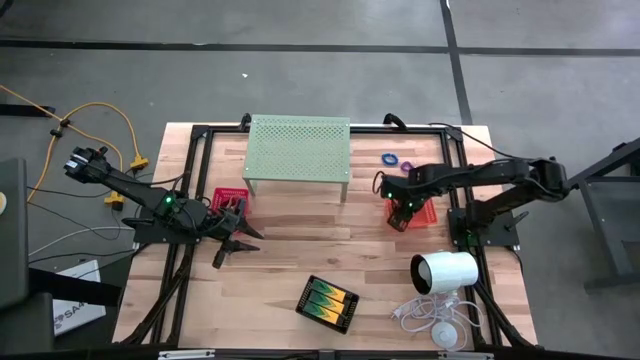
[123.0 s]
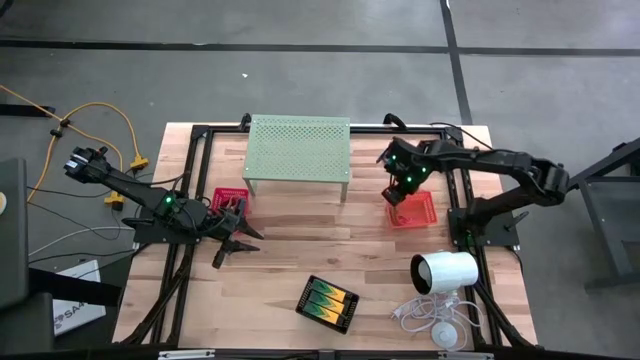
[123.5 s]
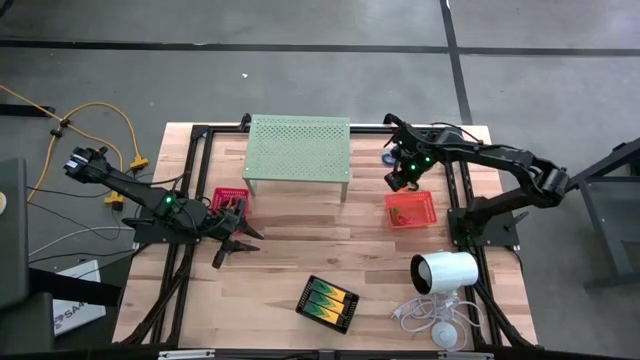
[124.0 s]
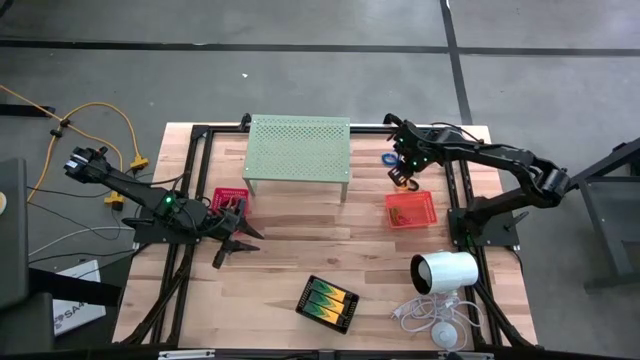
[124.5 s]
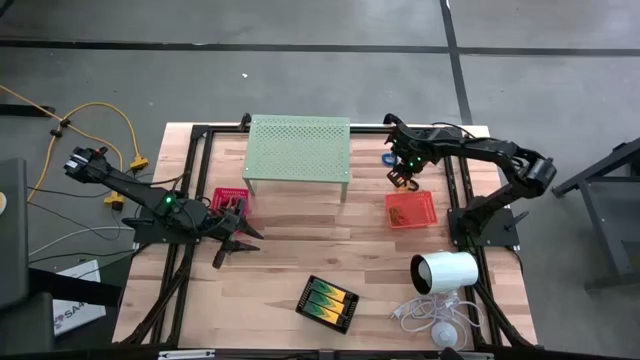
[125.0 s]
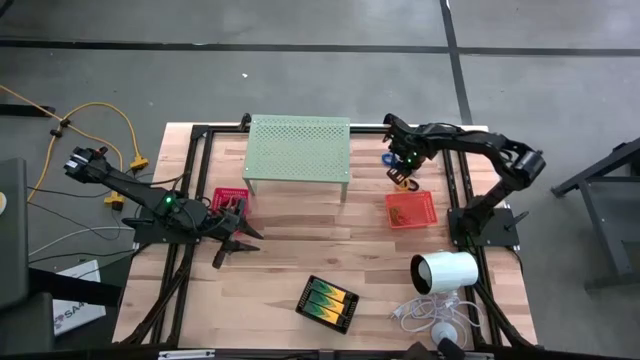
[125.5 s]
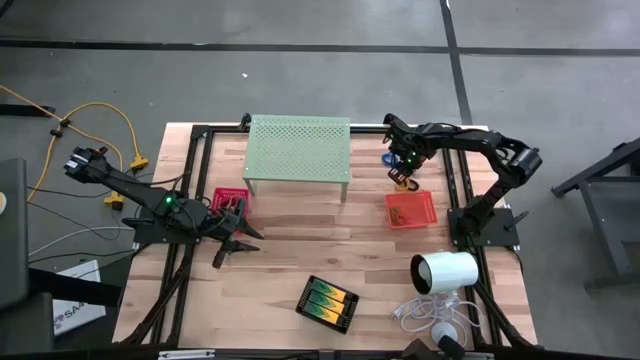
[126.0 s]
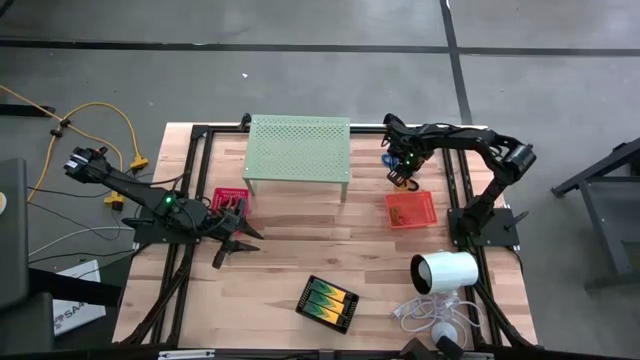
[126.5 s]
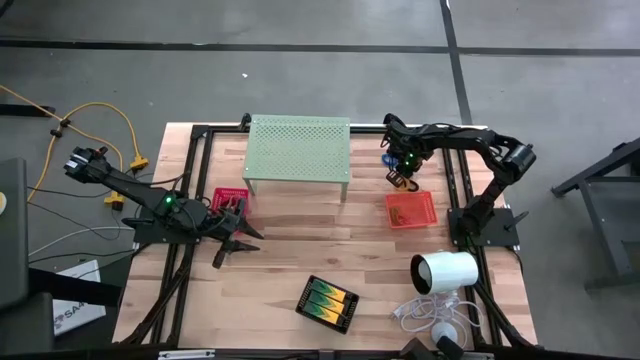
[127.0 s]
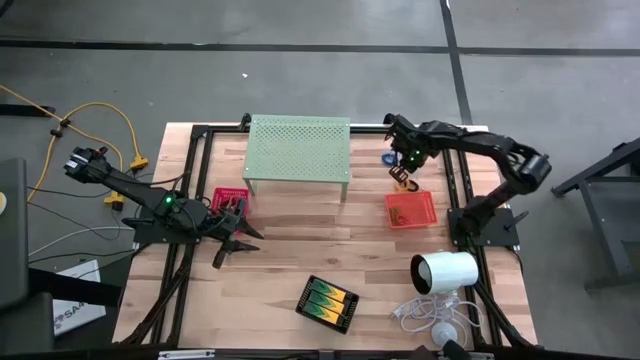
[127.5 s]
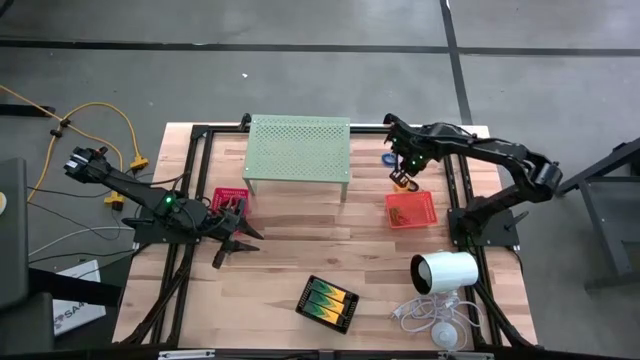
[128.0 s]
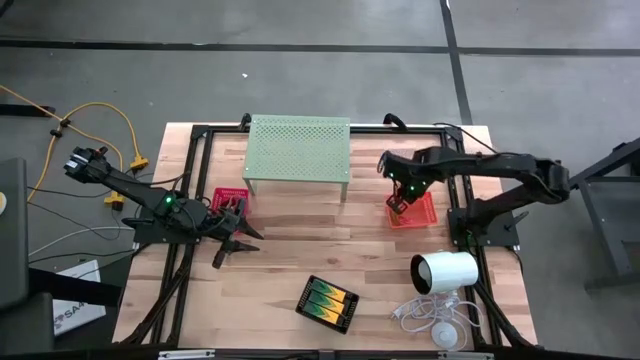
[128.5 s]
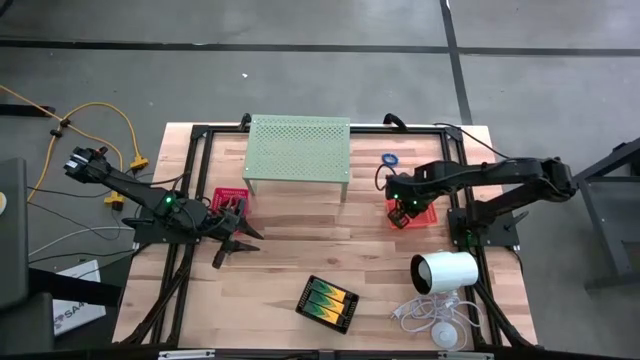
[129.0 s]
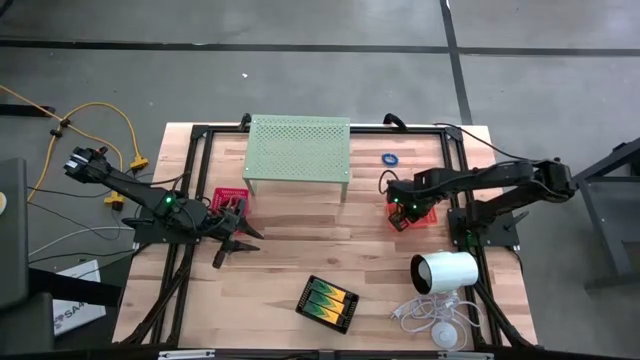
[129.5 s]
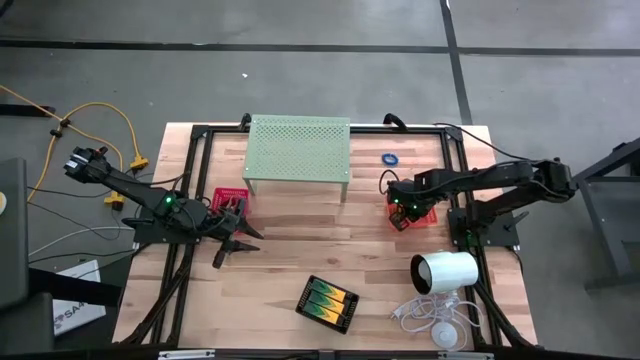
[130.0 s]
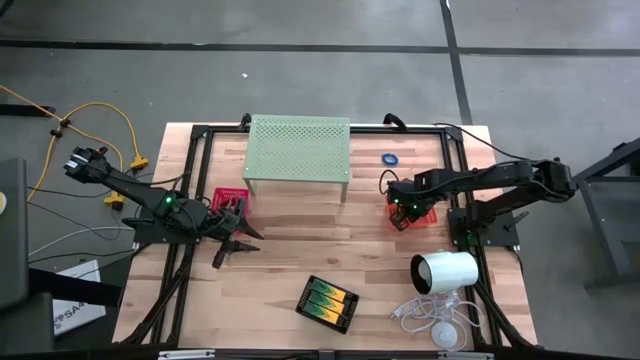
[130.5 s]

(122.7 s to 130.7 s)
Task: Pick & Place Office Desk Supplies
Put the violet spring keychain into the orange bin

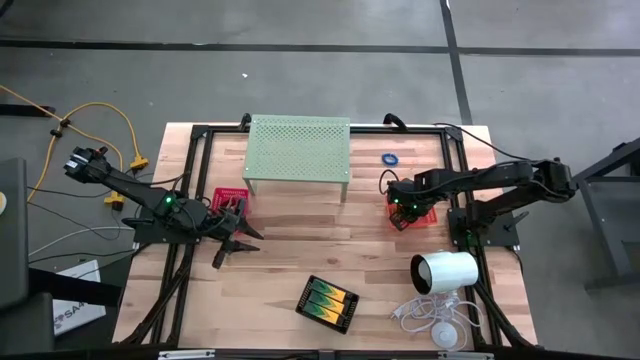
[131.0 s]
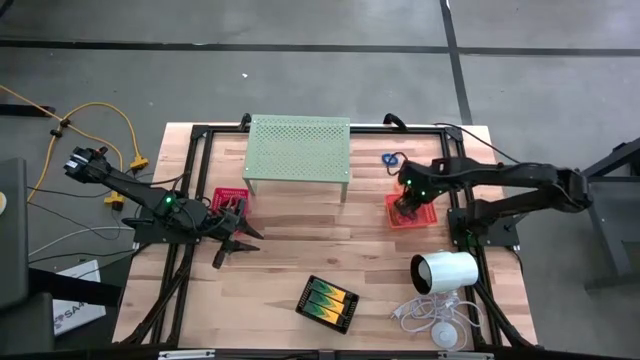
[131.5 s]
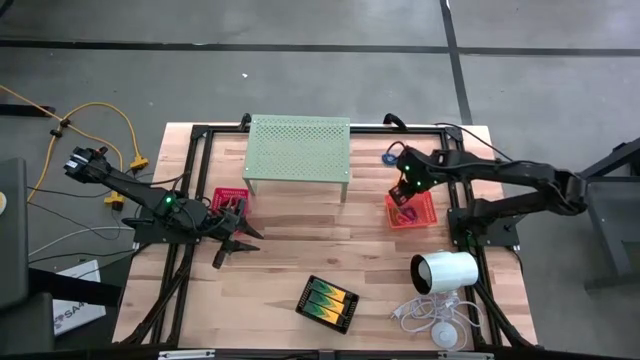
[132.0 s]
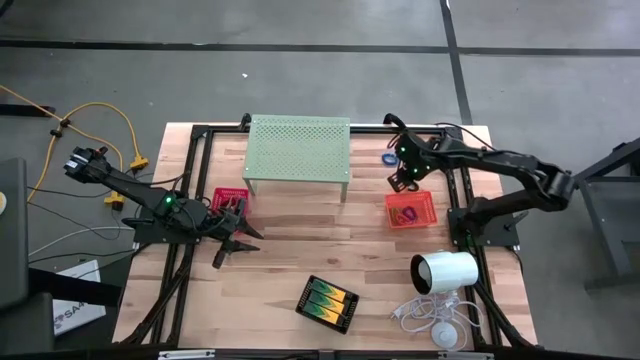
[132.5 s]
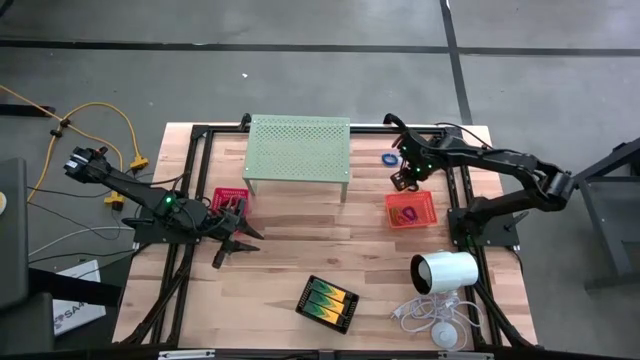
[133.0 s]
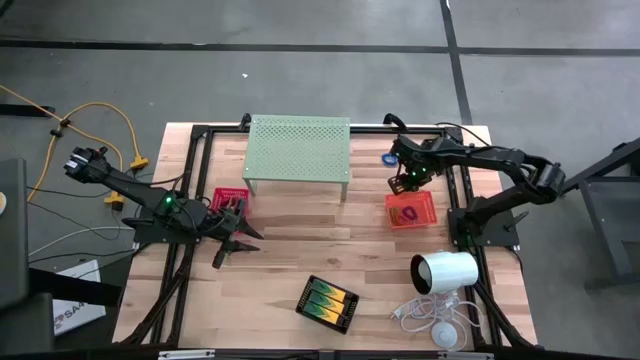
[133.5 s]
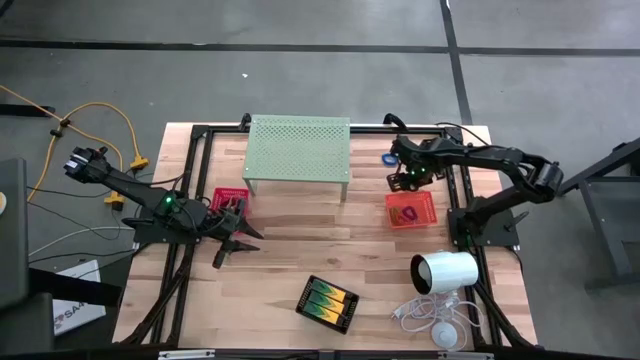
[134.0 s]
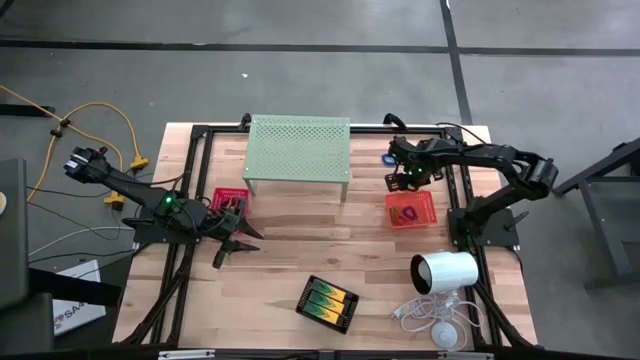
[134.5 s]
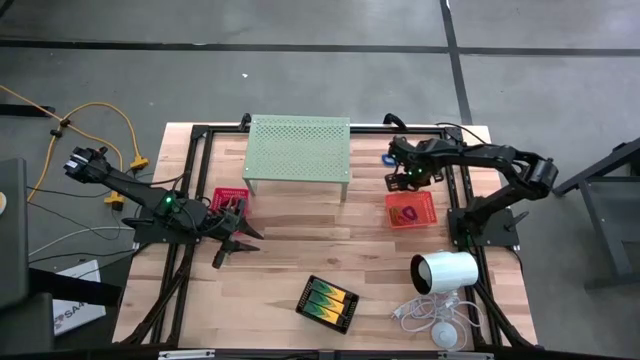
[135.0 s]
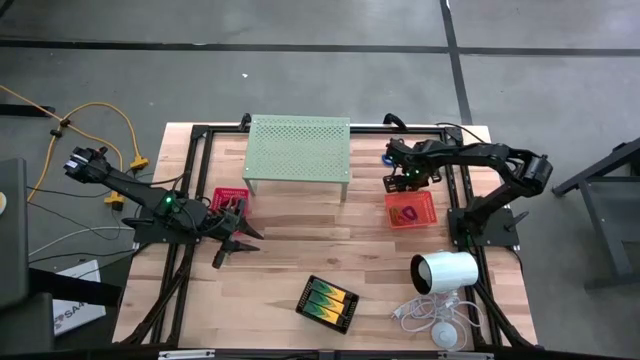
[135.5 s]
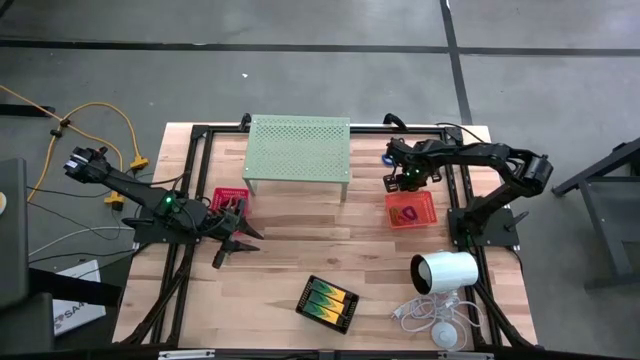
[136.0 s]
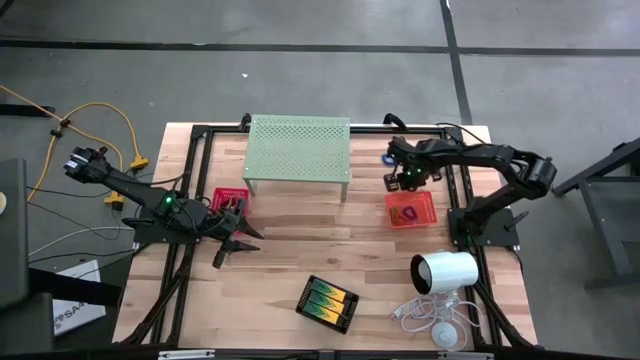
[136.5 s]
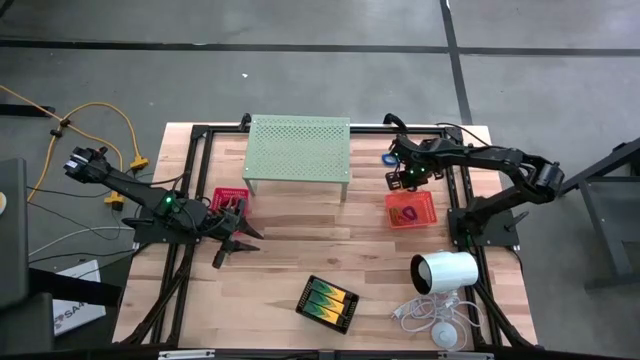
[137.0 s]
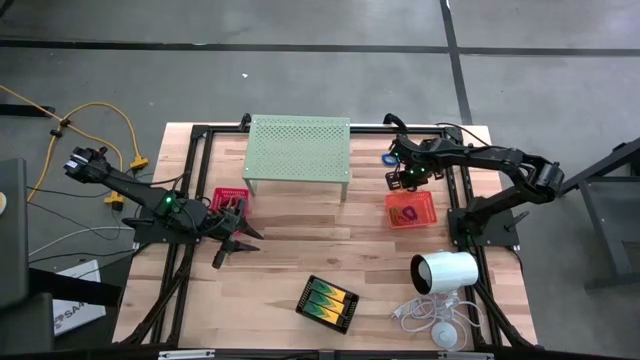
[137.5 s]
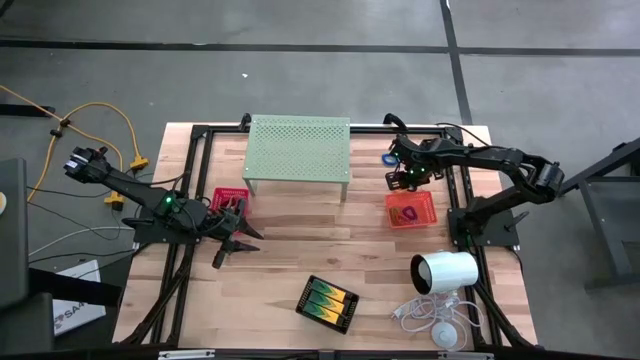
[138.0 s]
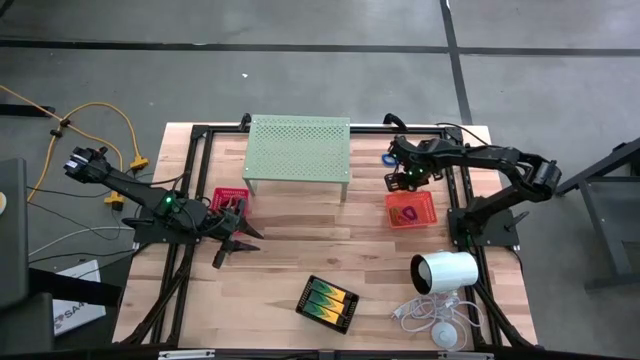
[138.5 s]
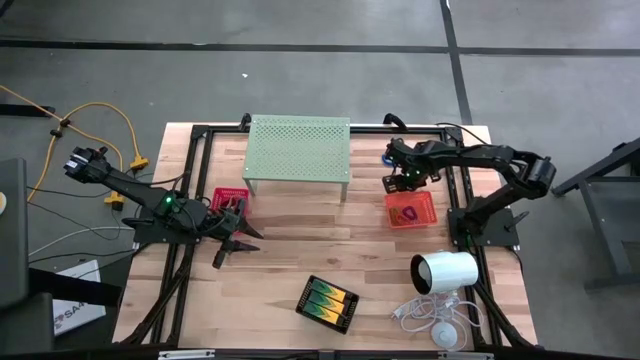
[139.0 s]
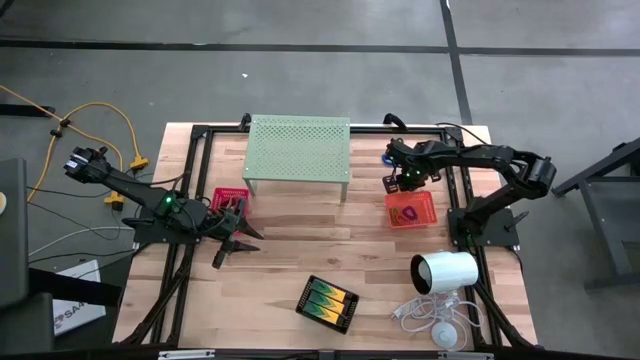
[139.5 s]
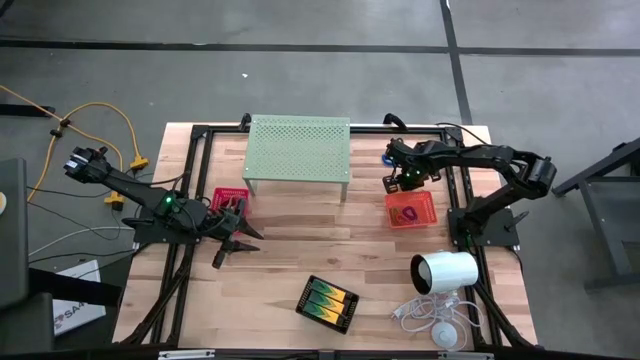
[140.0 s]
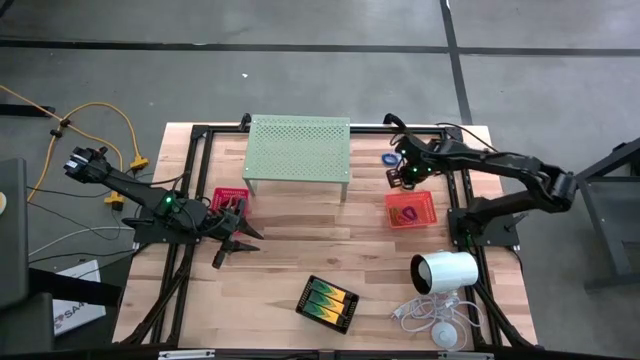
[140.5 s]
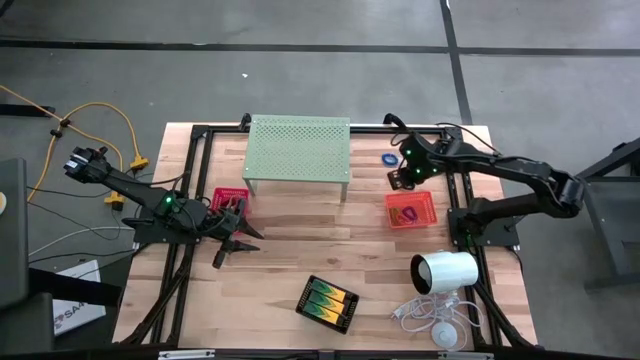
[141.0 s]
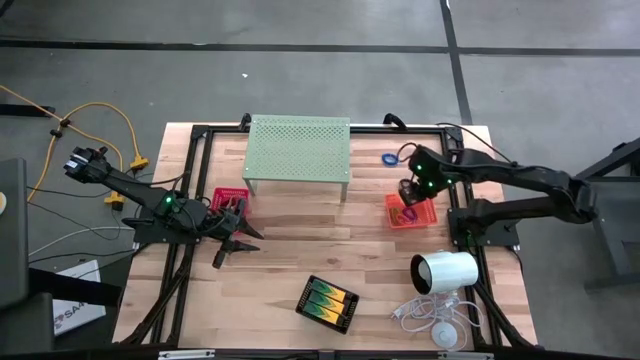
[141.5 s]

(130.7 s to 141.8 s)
Put the yellow spring keychain into the orange bin

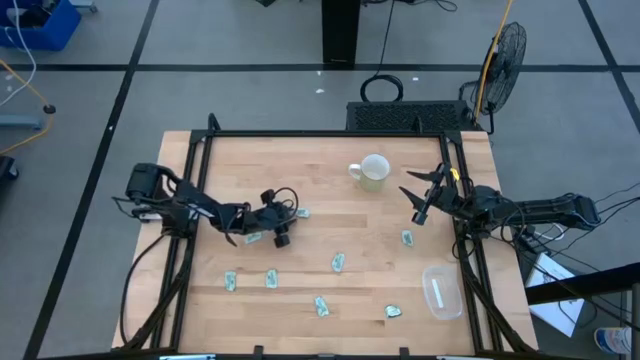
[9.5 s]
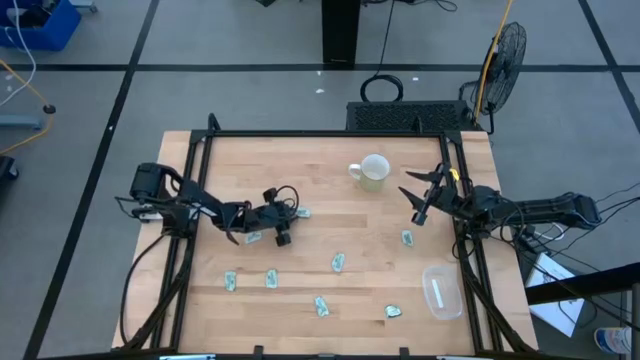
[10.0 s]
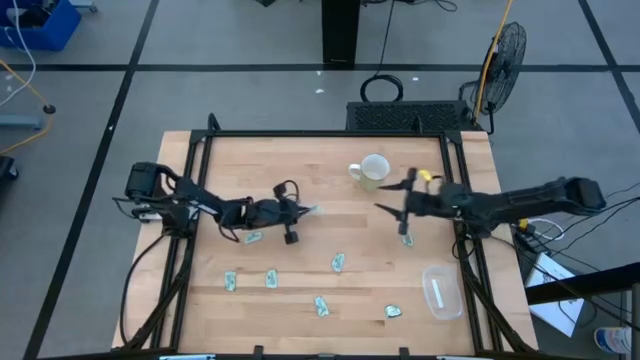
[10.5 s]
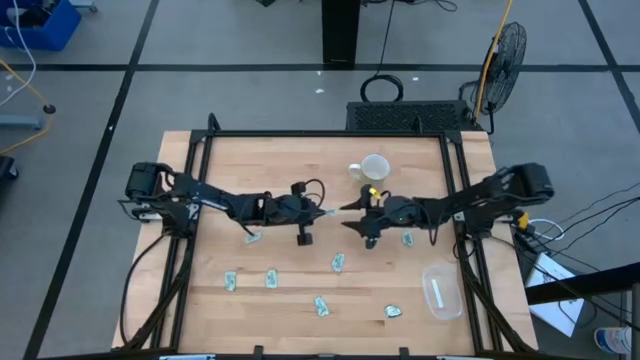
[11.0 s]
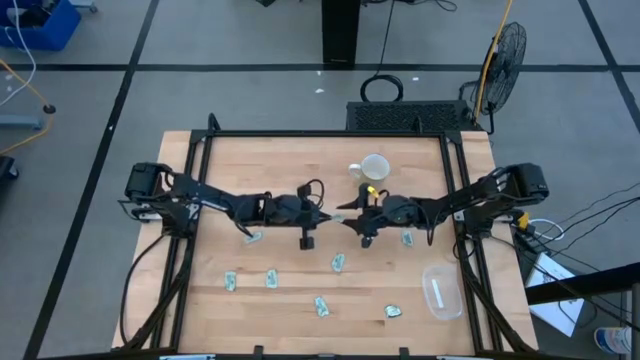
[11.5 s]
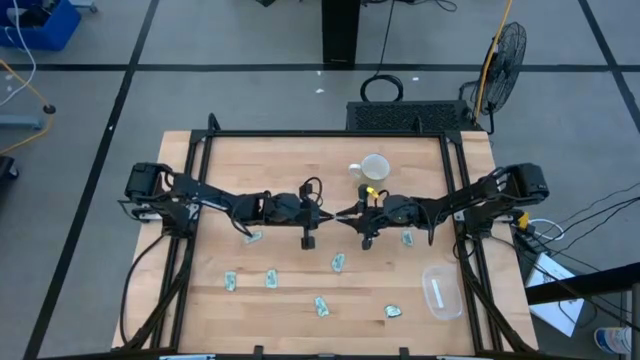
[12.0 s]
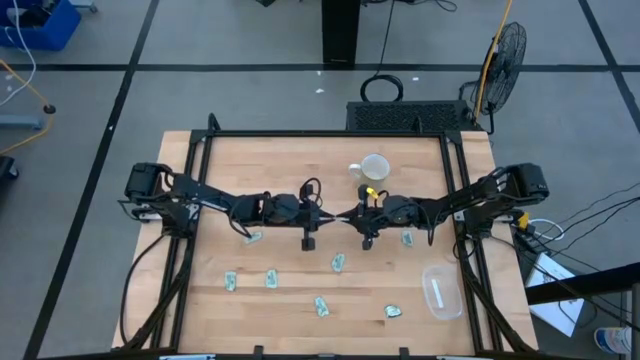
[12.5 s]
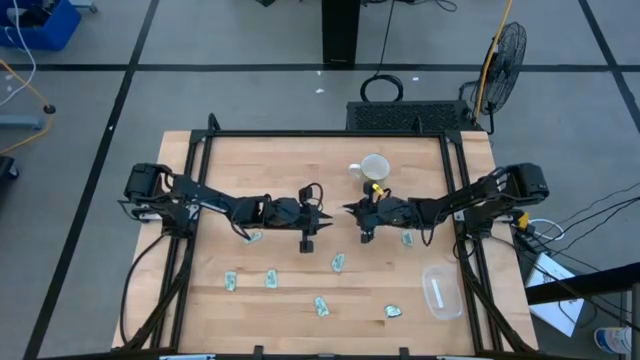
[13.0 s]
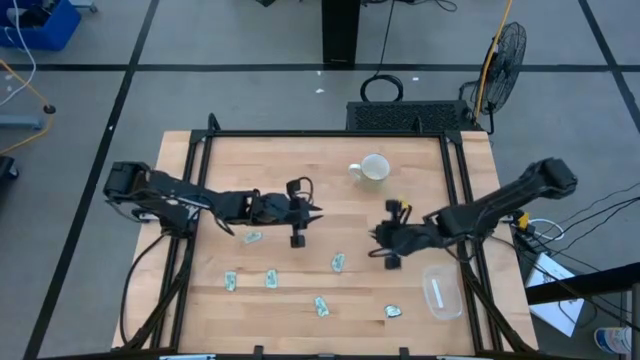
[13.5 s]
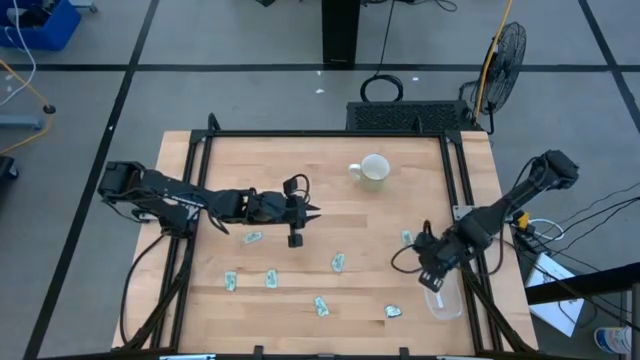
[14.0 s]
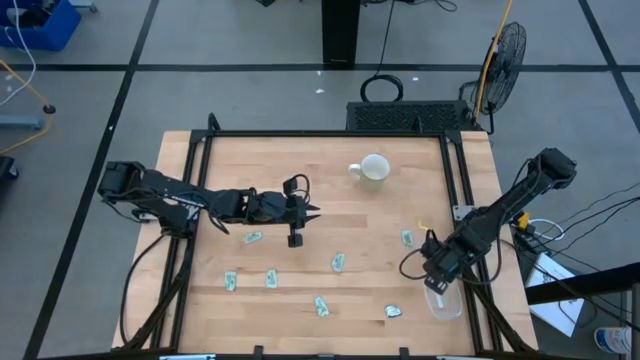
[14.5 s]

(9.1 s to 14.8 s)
Task: Pick and place Stevia / Truvia into bins
Put the stevia packet into the transparent bin
